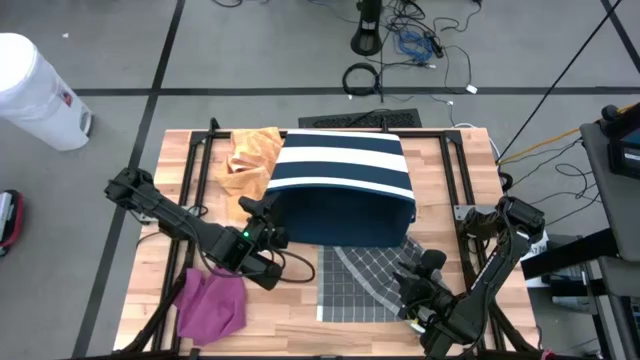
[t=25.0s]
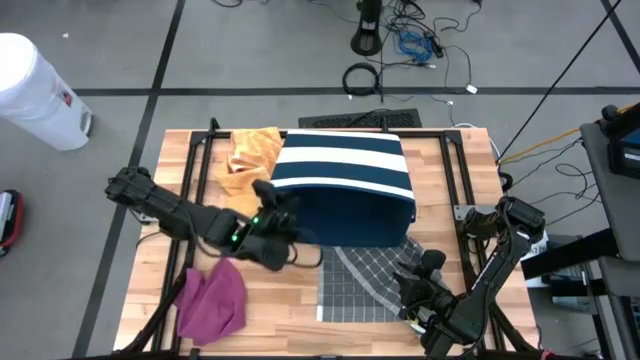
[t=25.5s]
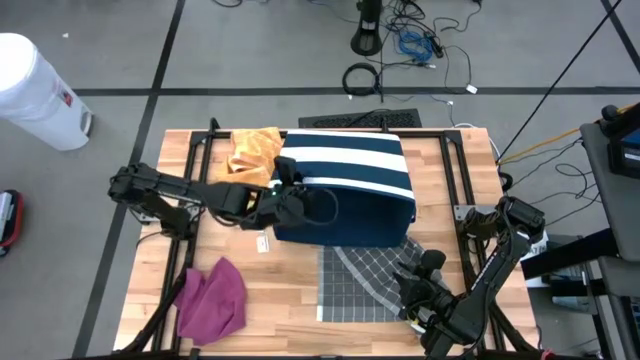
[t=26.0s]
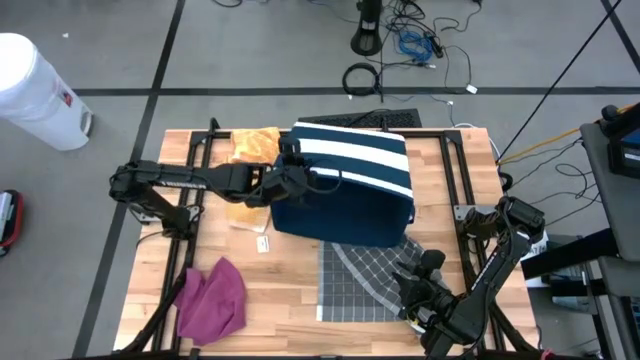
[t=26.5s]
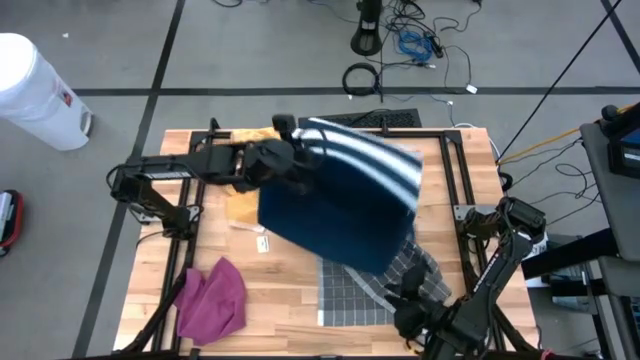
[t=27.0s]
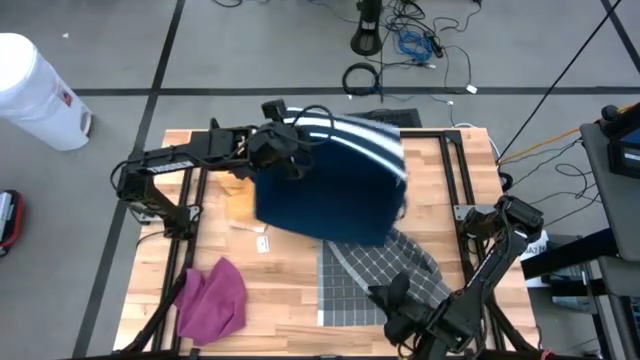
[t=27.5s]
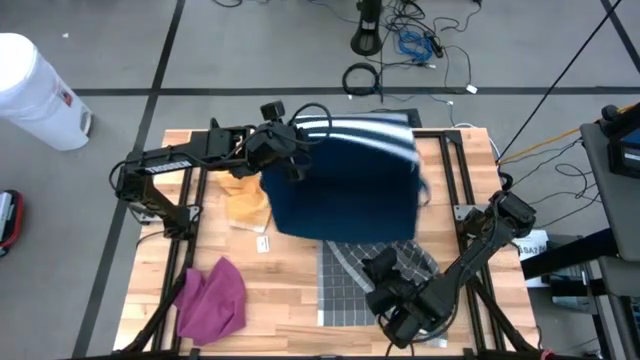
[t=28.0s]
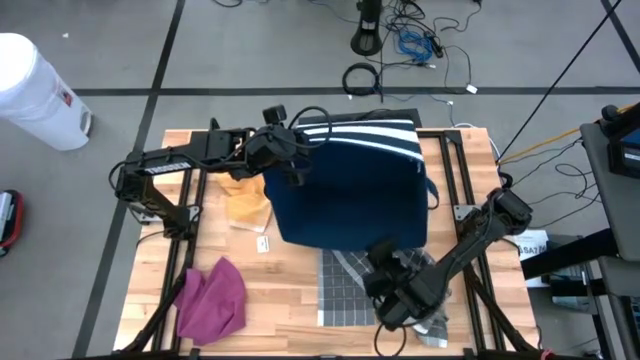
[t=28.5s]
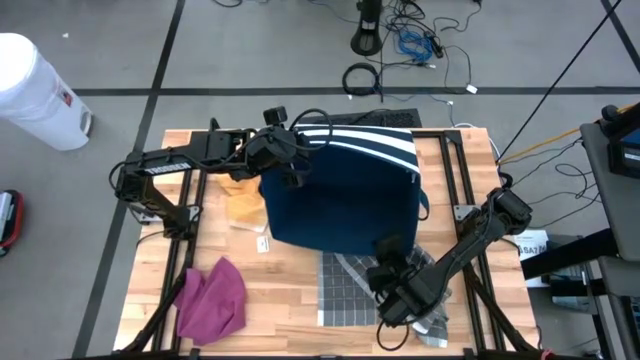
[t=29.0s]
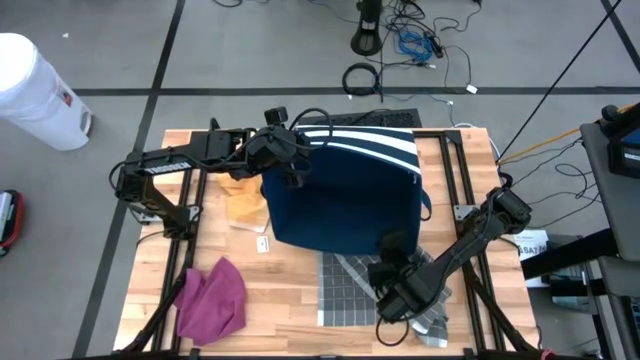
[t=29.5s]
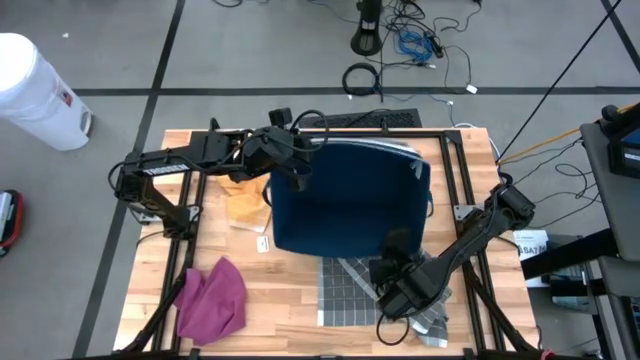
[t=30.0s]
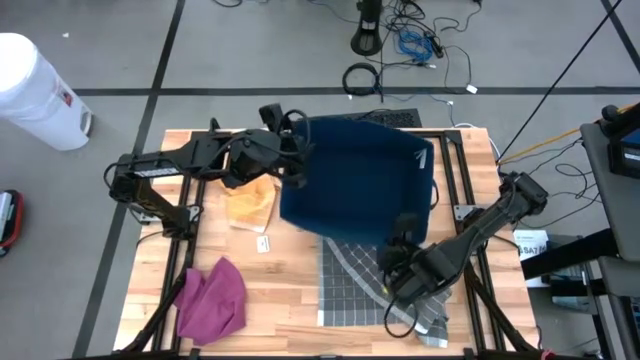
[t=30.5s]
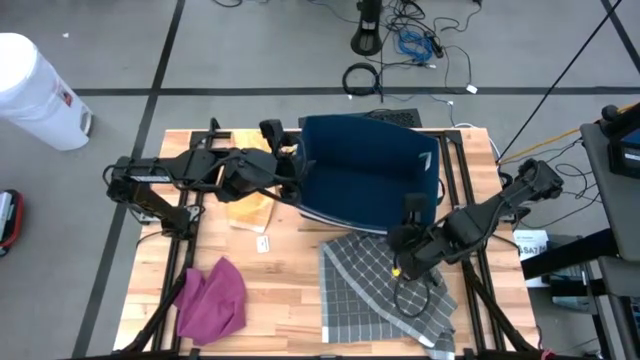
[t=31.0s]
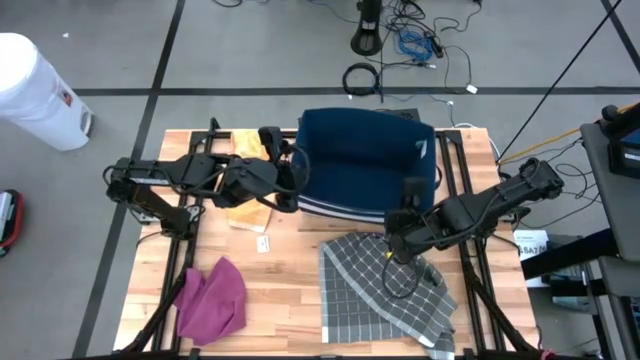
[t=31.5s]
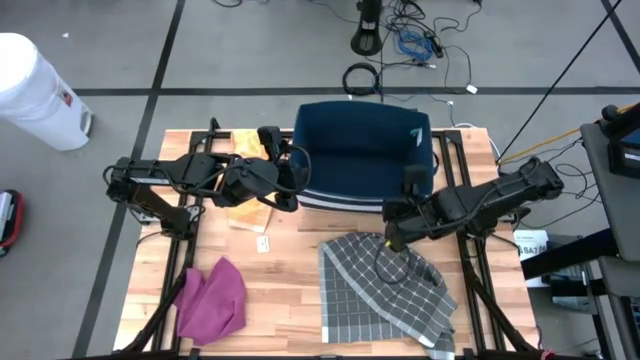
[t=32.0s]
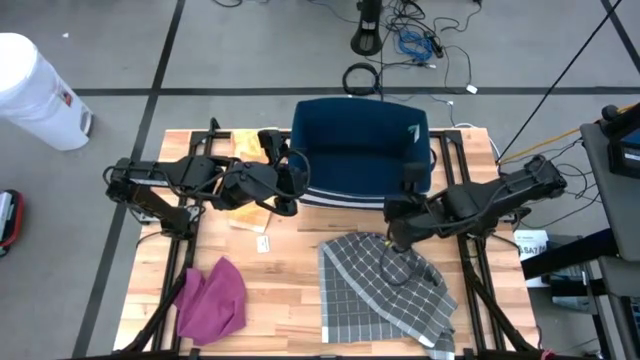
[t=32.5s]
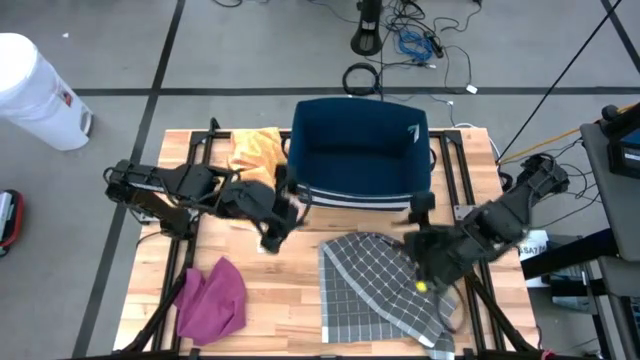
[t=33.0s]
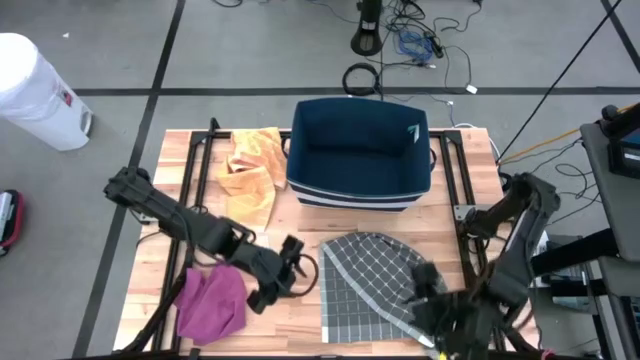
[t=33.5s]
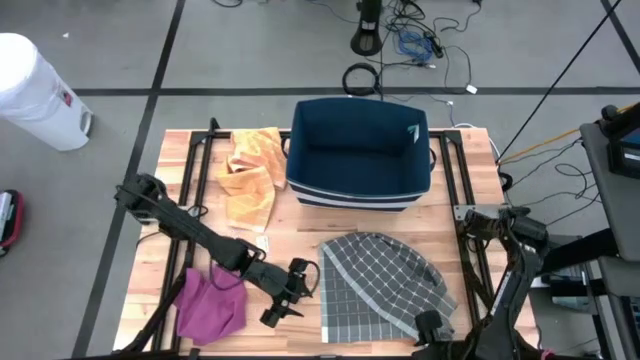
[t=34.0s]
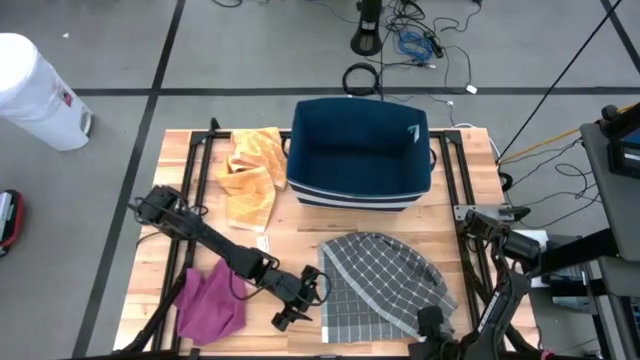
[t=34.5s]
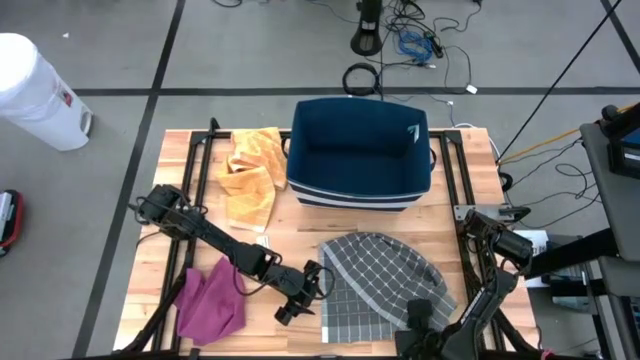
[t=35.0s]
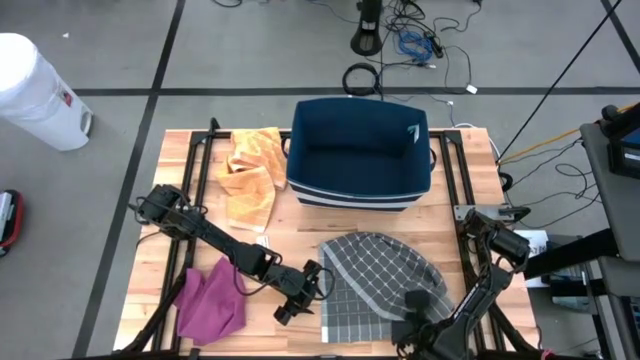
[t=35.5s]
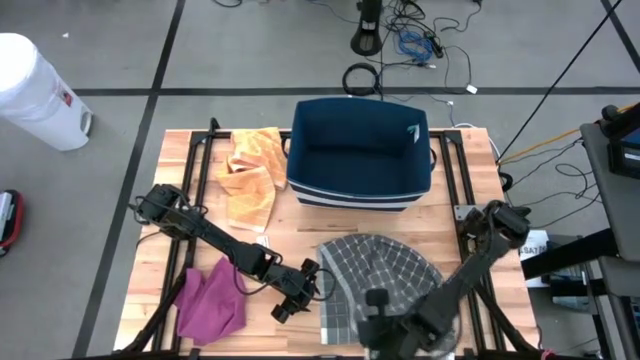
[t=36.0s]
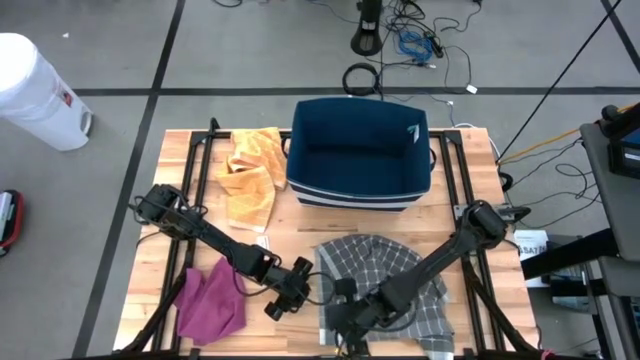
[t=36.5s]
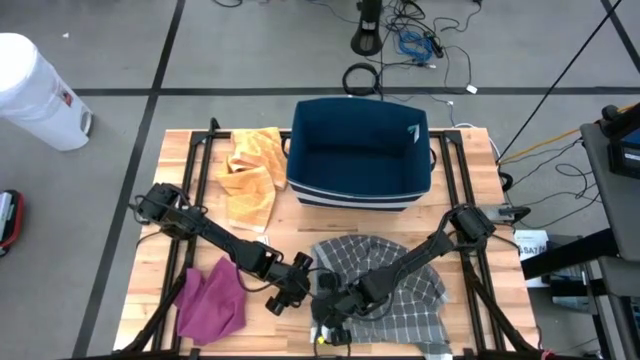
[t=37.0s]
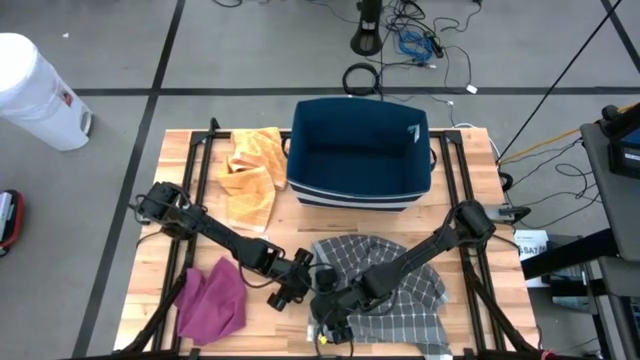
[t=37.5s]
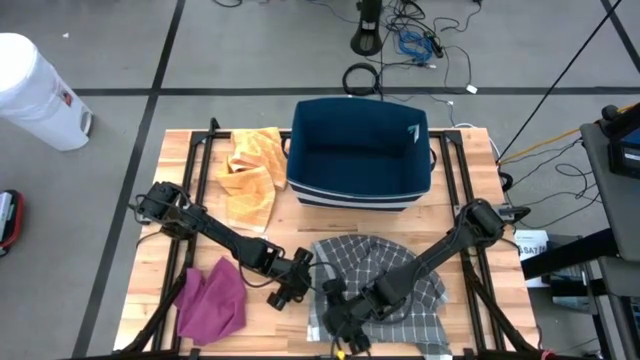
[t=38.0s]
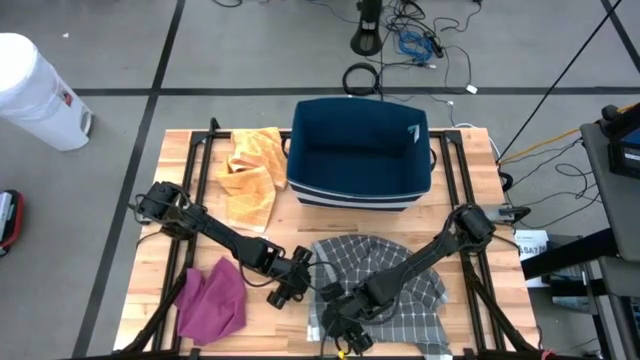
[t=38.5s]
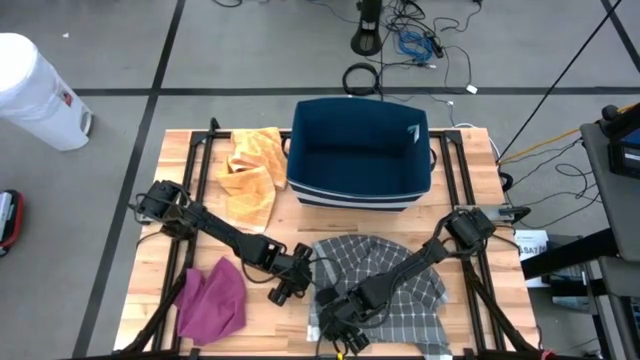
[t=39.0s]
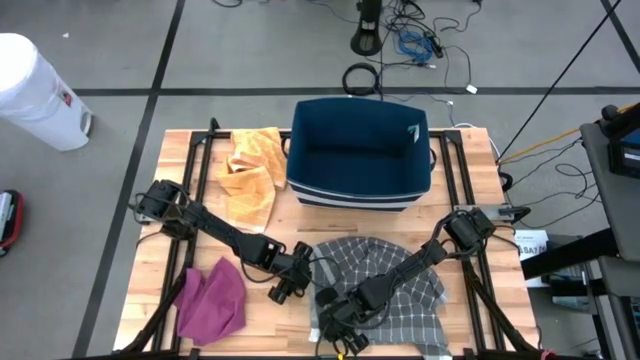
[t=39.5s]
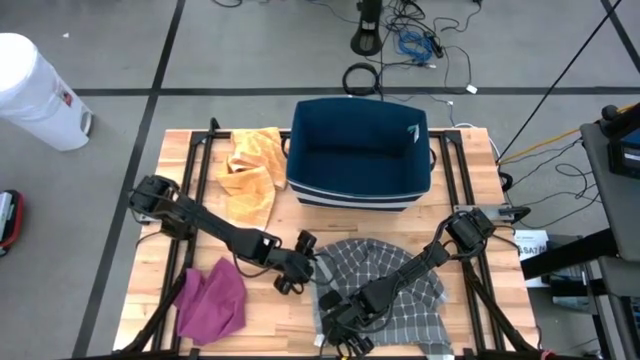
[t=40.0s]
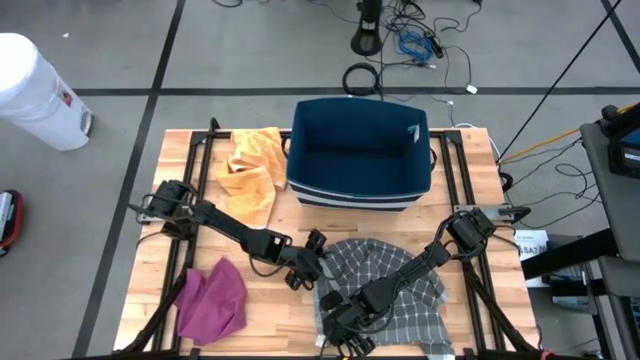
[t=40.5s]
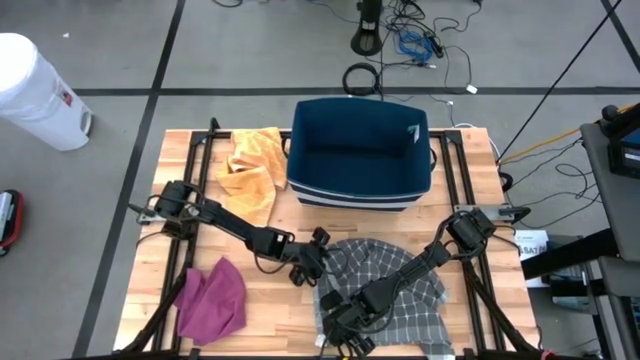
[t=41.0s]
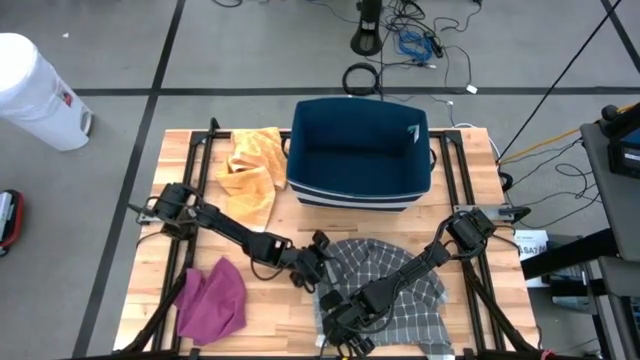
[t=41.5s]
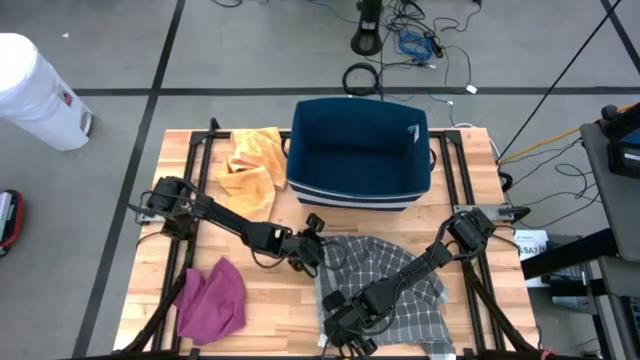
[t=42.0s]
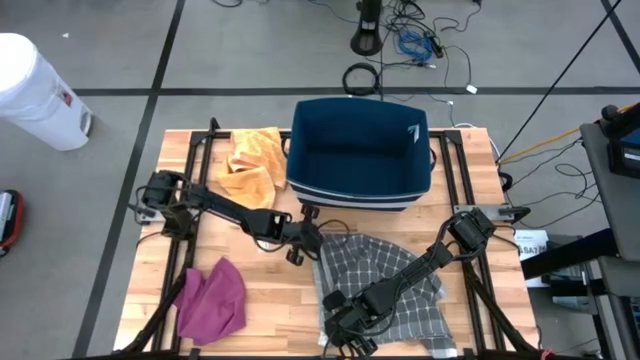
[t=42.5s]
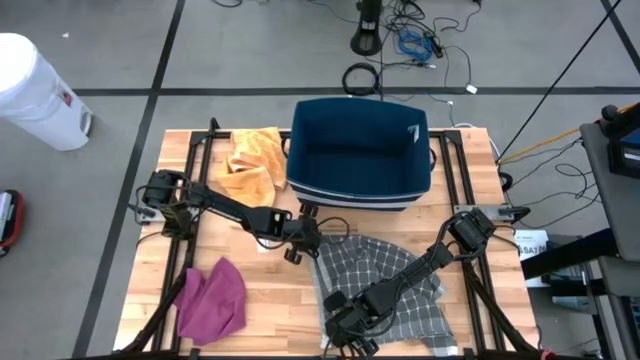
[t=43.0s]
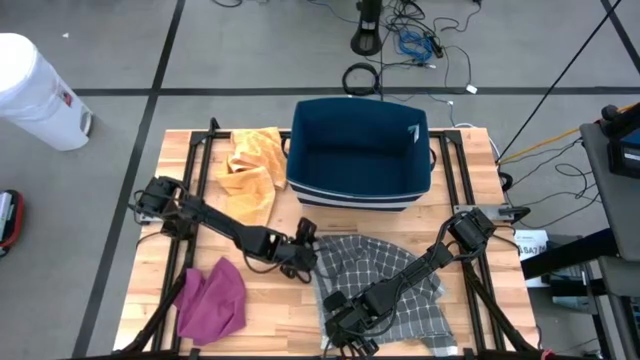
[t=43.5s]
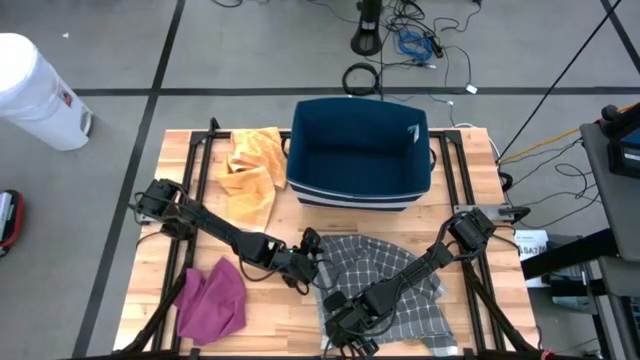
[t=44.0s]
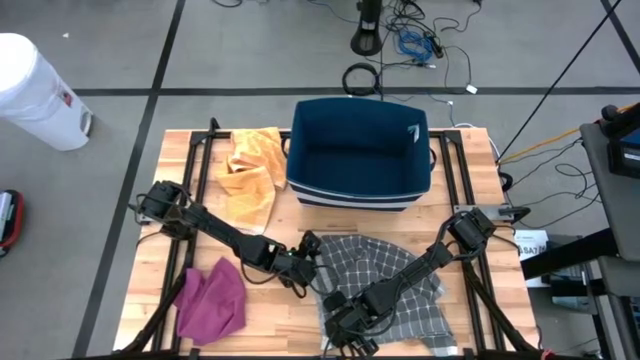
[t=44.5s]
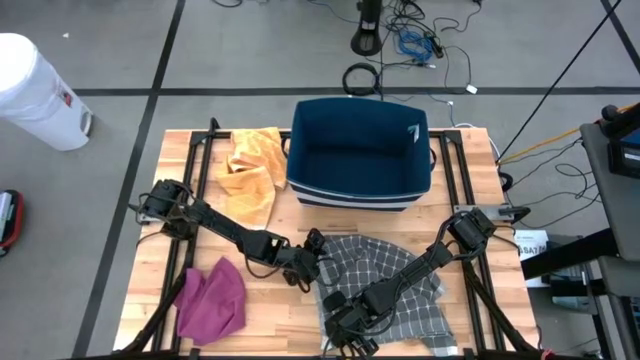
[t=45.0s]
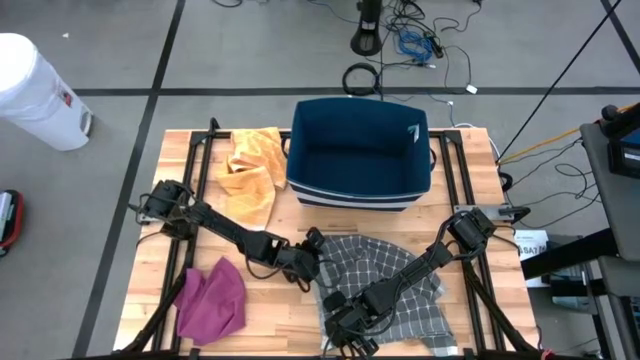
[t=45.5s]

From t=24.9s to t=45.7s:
Task: Fold towel
Fold the gray patterned towel
